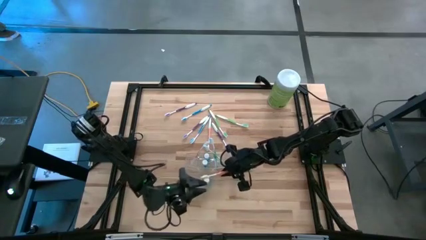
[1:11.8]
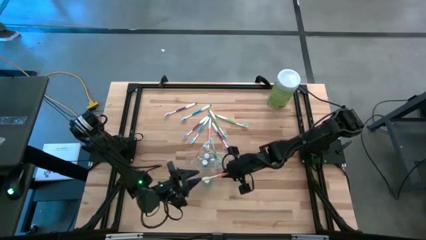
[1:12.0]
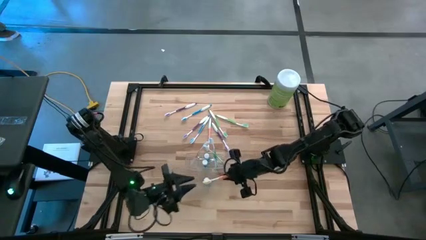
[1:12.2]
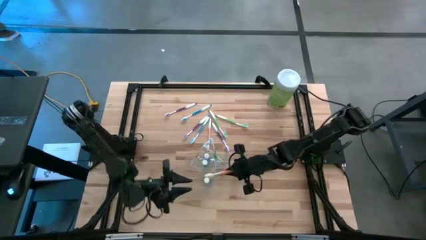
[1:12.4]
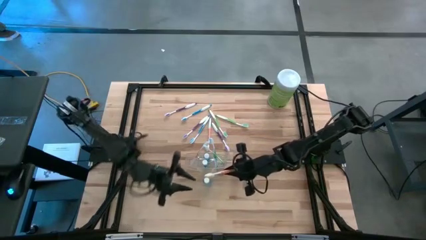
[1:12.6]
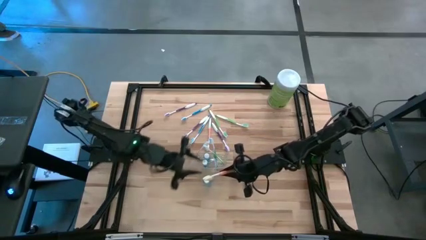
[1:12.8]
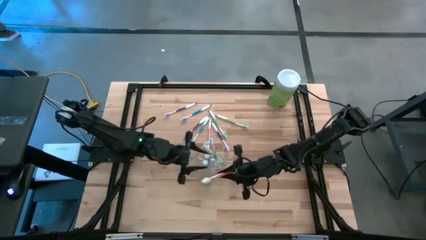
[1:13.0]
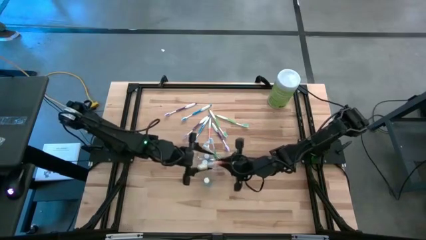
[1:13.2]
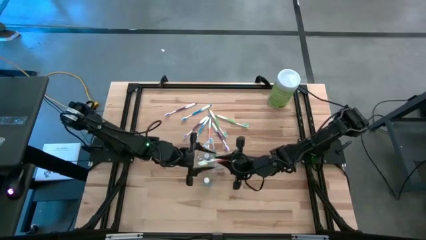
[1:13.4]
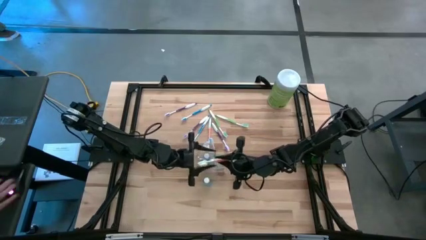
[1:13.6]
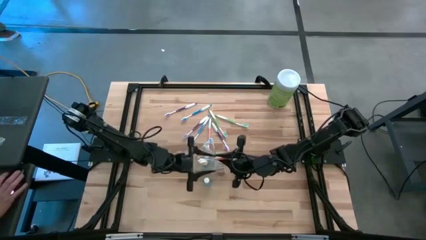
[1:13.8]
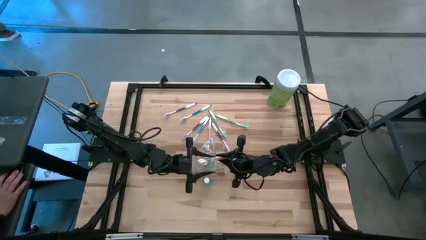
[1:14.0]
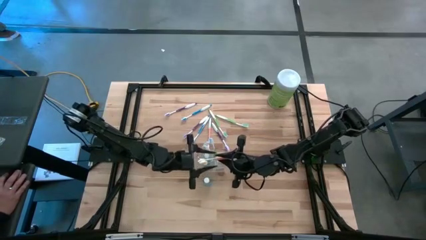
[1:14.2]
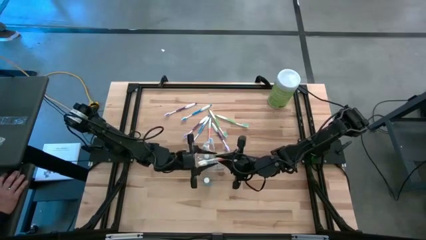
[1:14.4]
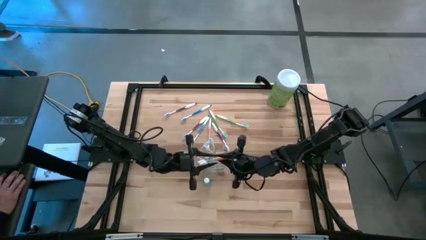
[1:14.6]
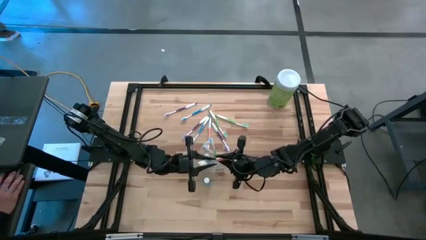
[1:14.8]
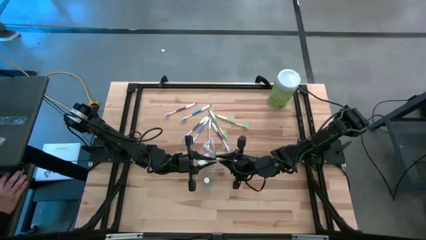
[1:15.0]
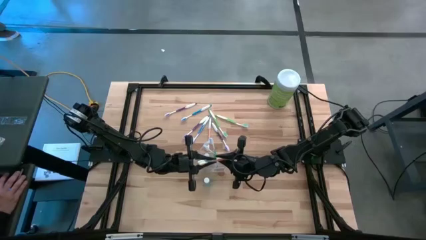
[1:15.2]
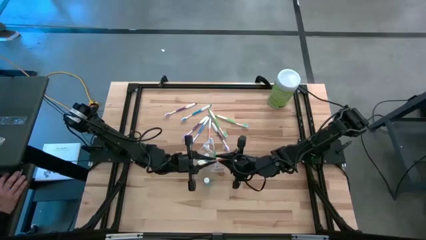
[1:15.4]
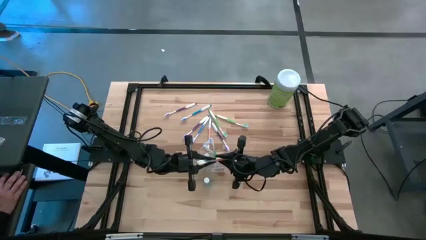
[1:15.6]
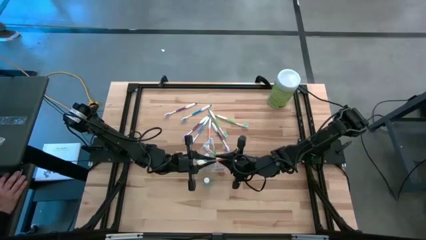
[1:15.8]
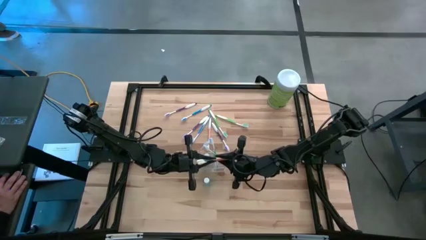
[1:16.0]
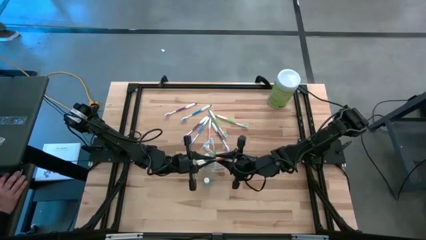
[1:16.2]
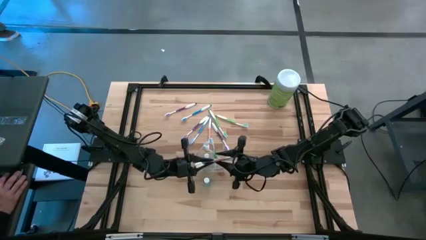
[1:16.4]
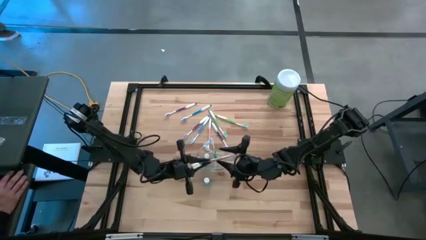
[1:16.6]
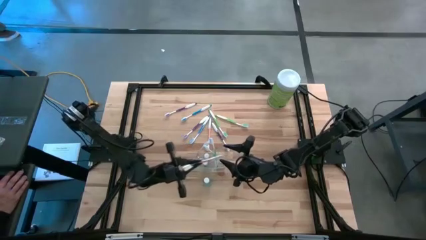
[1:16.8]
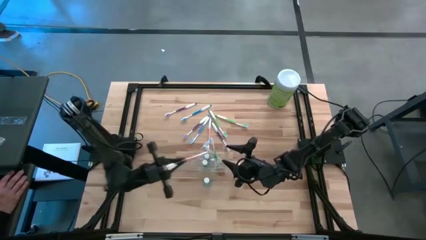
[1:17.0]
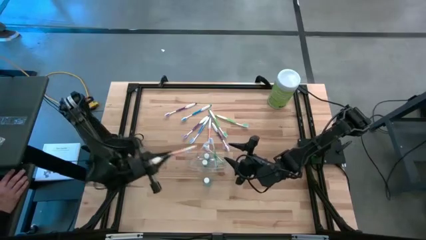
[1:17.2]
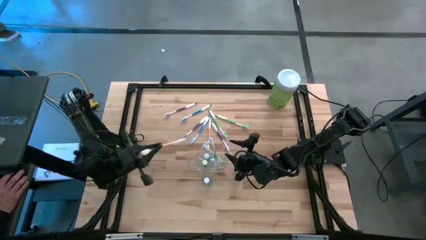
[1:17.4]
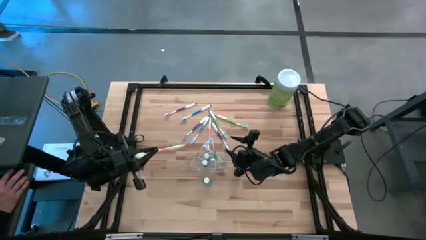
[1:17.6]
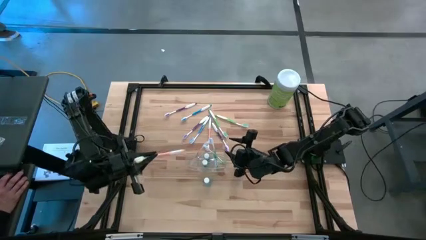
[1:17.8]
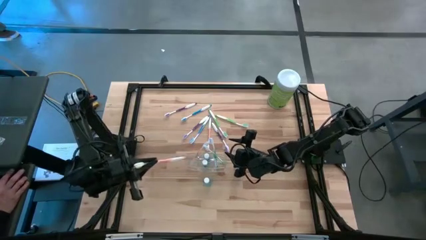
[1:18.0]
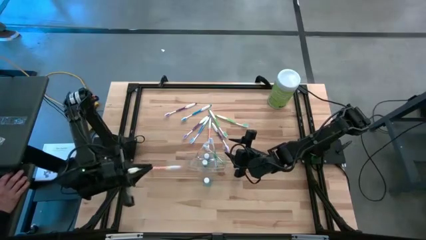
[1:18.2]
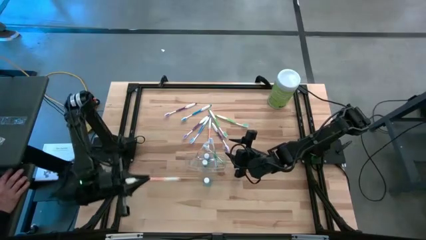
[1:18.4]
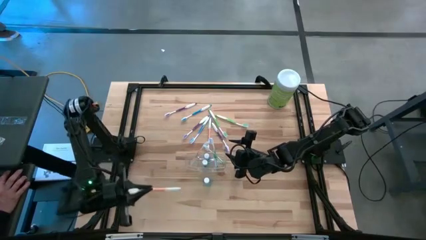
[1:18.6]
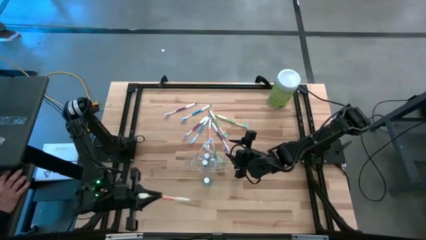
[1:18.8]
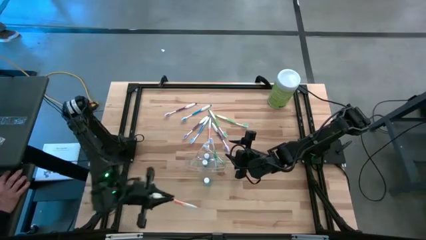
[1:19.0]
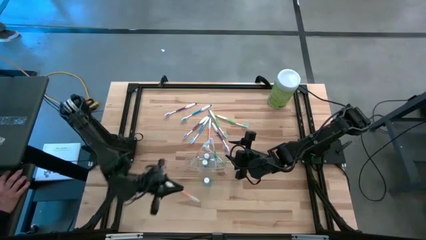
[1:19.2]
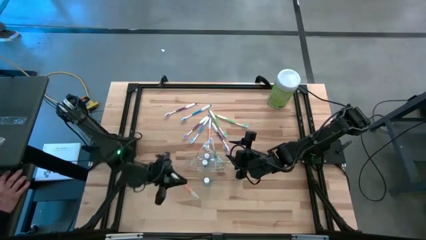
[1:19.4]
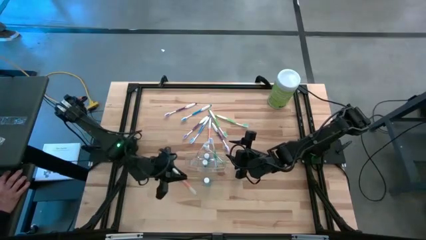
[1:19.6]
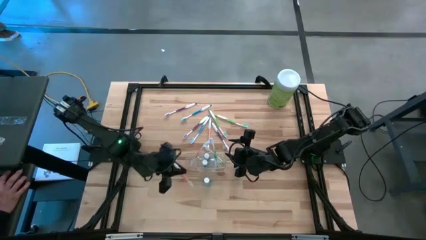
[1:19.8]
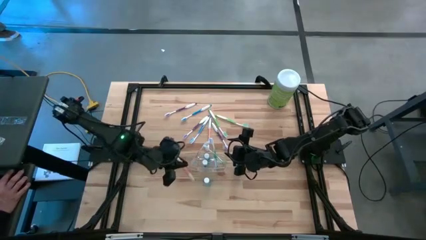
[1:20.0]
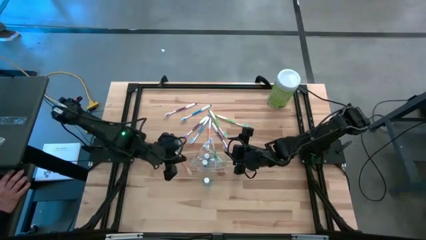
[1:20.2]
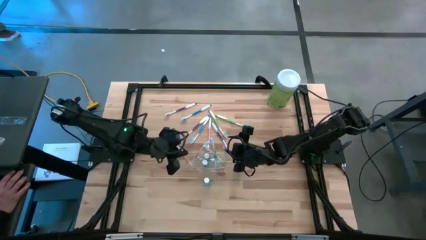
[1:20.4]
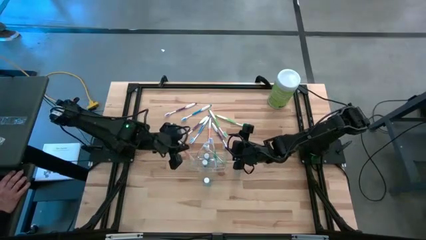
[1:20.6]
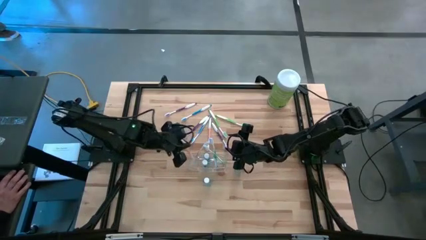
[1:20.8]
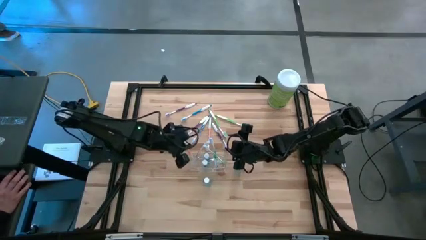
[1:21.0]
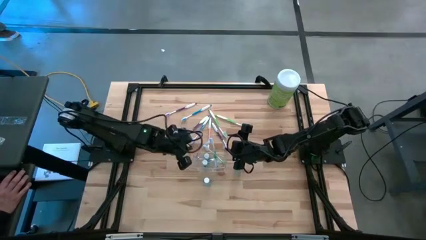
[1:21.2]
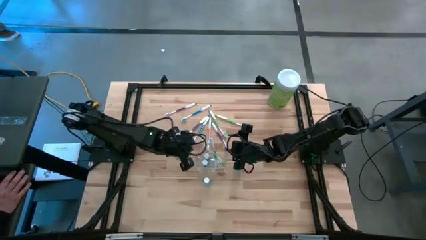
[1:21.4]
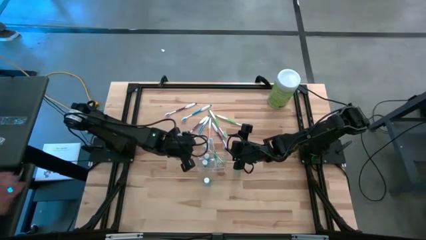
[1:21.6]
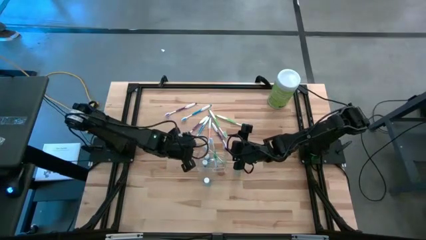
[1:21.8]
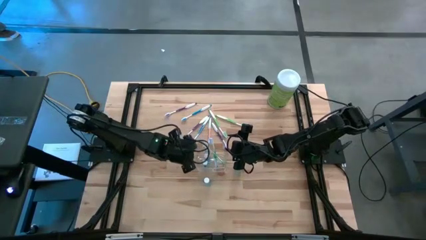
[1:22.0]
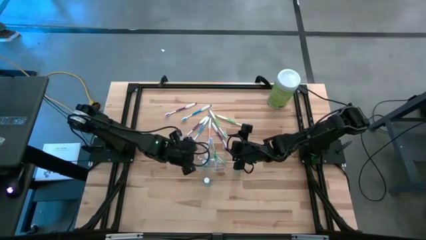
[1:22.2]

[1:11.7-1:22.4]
Task: Pick & Place toothbrushing station
Put the orange toothbrush into the transparent organizer
